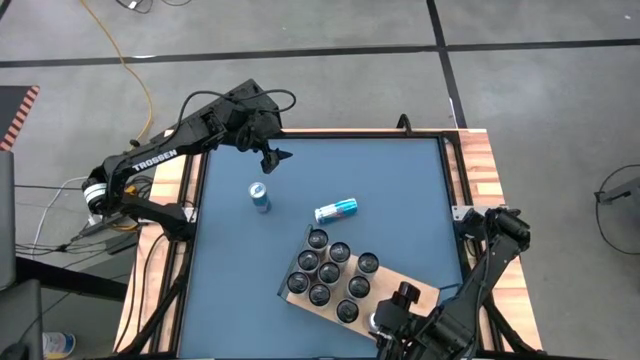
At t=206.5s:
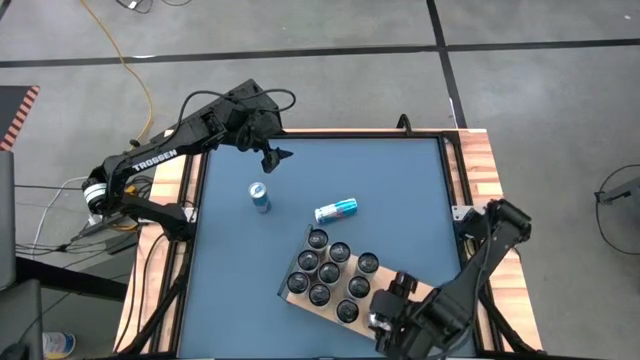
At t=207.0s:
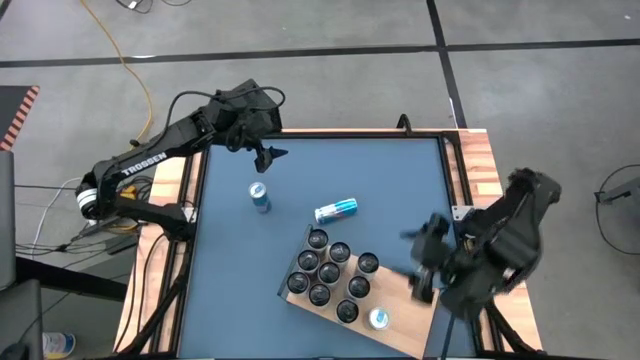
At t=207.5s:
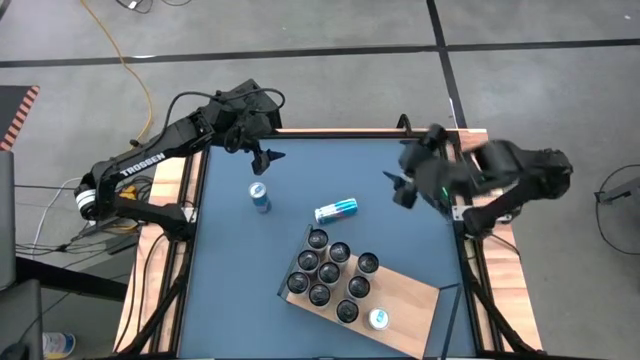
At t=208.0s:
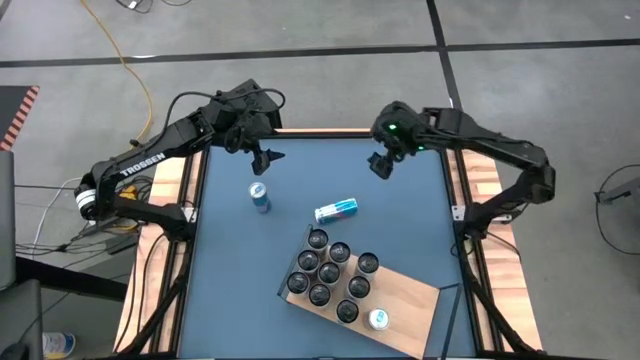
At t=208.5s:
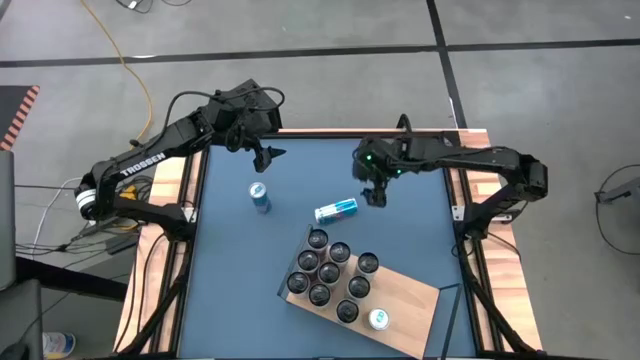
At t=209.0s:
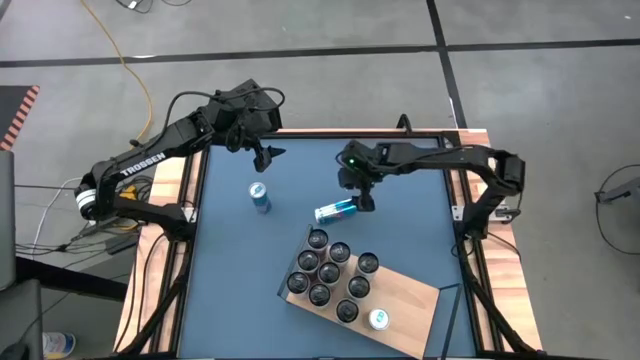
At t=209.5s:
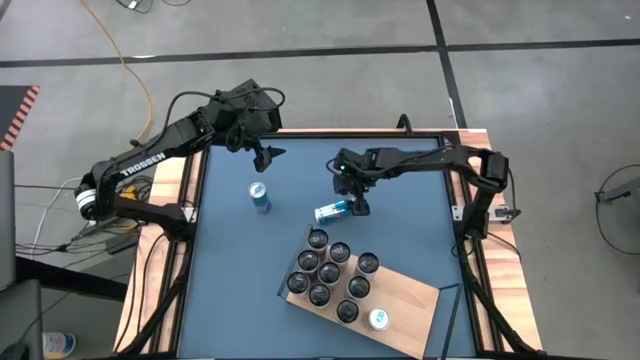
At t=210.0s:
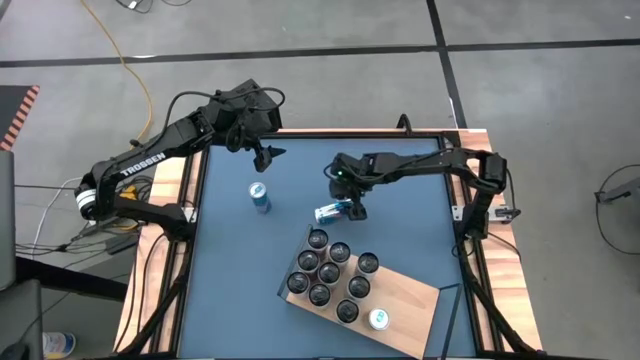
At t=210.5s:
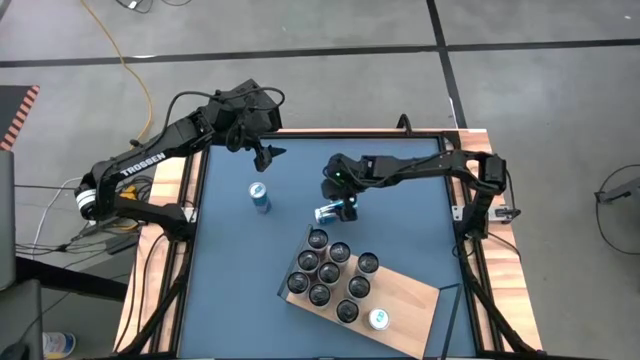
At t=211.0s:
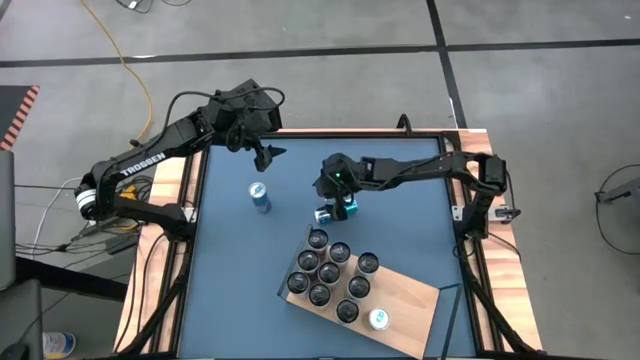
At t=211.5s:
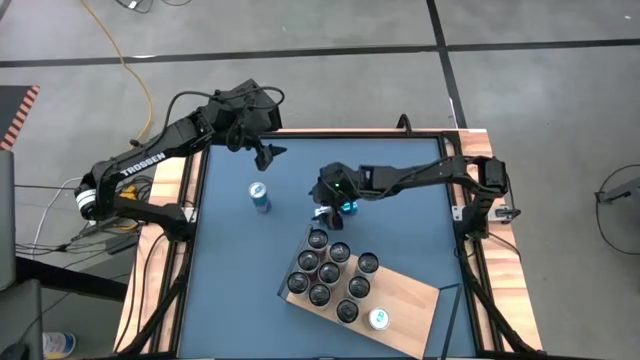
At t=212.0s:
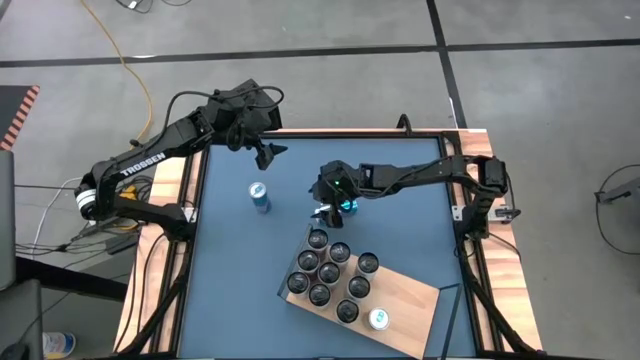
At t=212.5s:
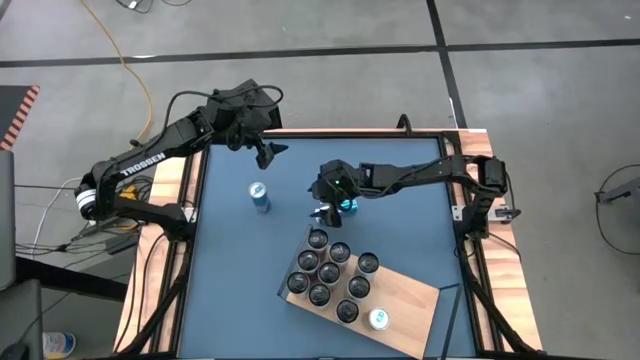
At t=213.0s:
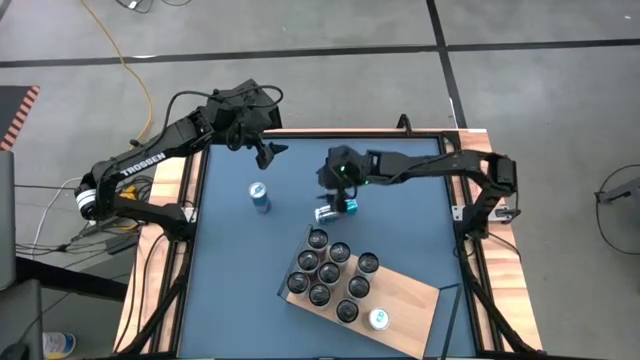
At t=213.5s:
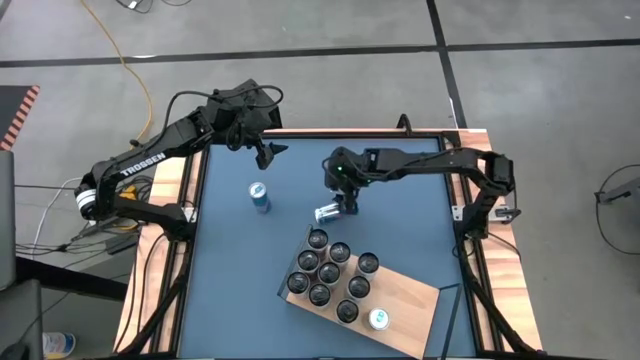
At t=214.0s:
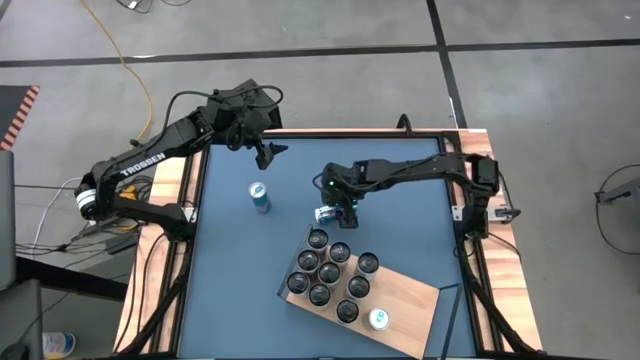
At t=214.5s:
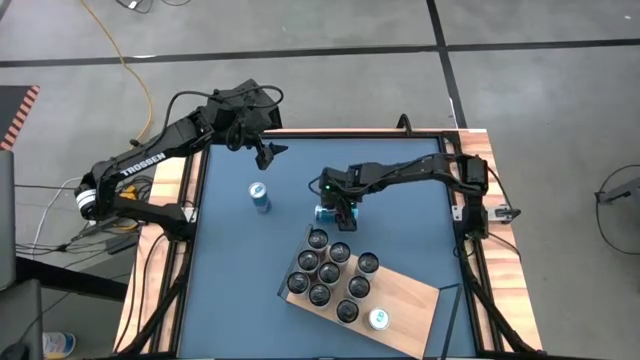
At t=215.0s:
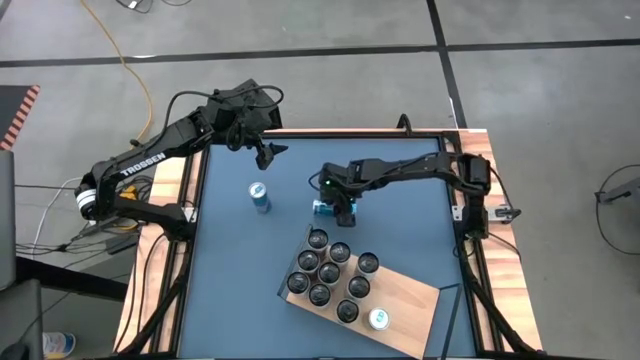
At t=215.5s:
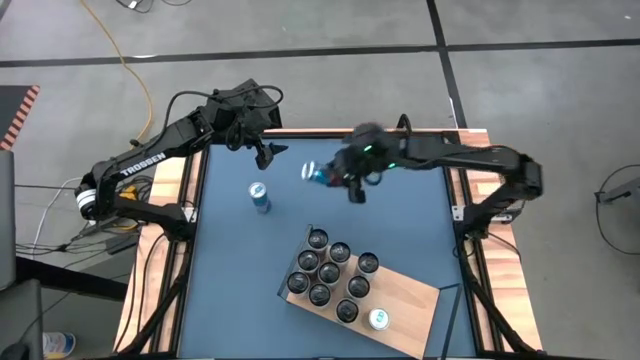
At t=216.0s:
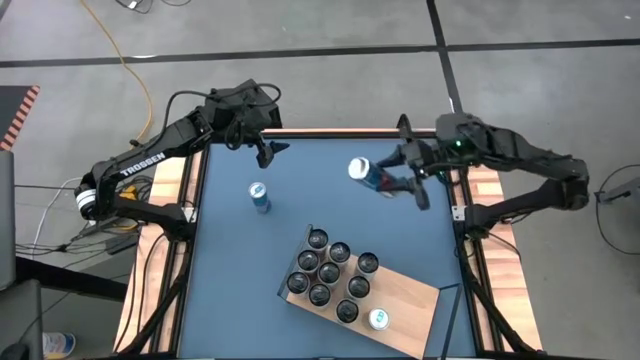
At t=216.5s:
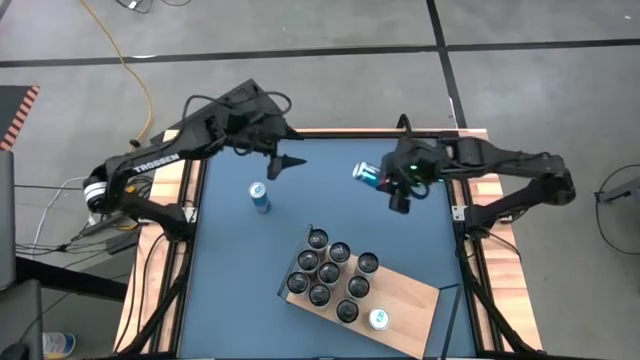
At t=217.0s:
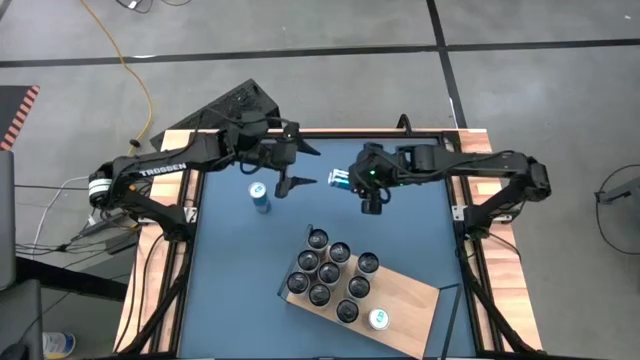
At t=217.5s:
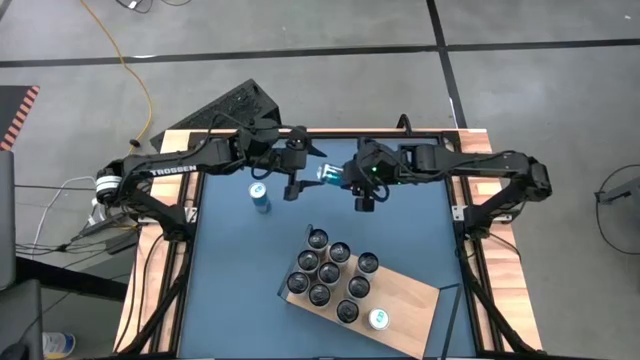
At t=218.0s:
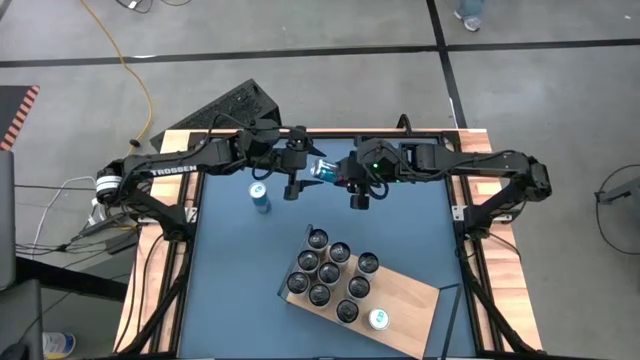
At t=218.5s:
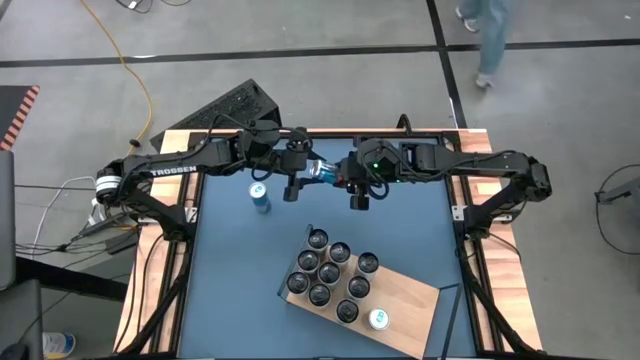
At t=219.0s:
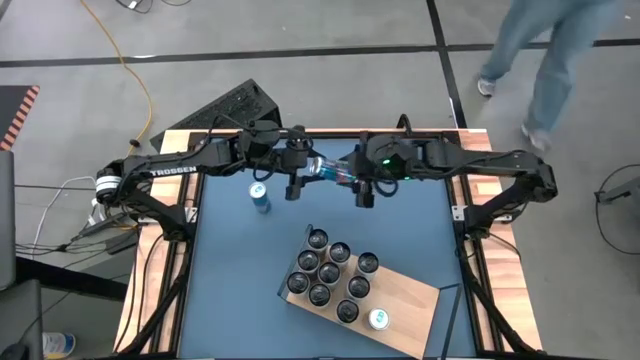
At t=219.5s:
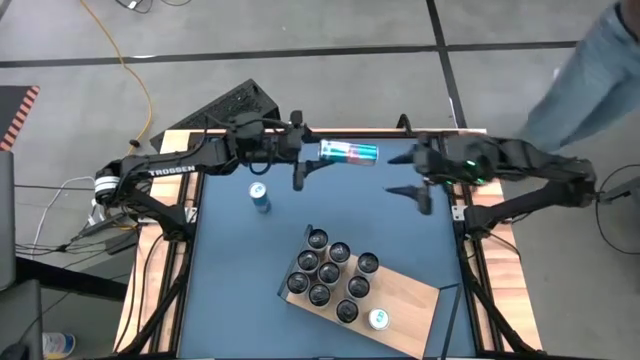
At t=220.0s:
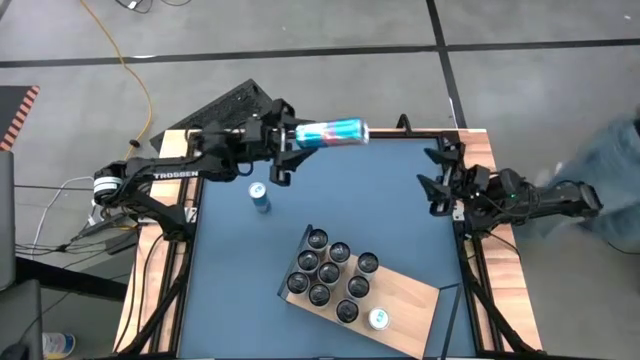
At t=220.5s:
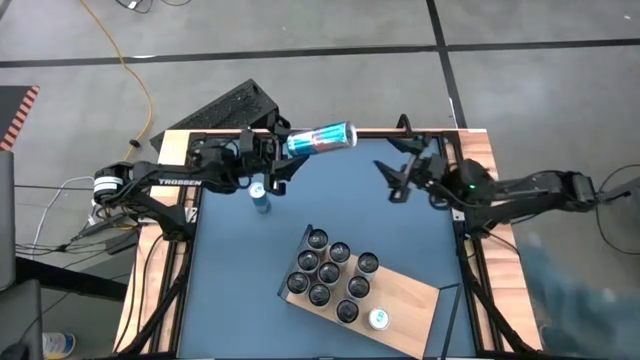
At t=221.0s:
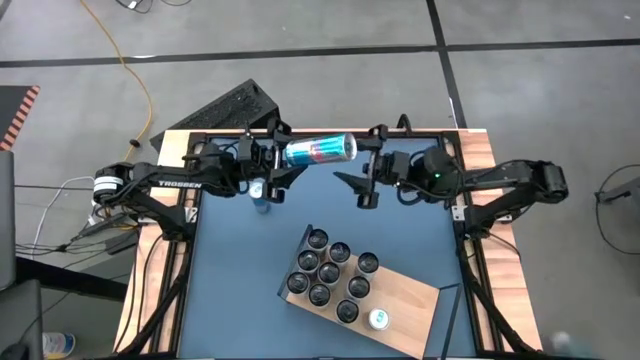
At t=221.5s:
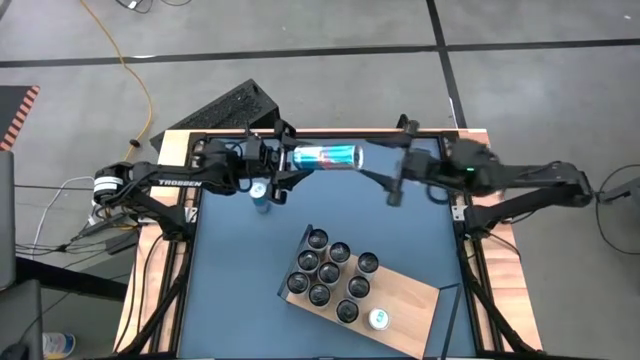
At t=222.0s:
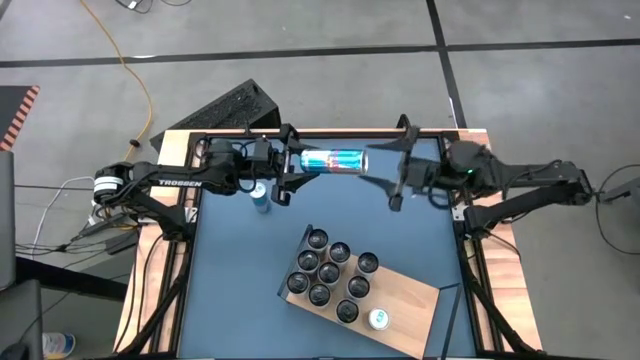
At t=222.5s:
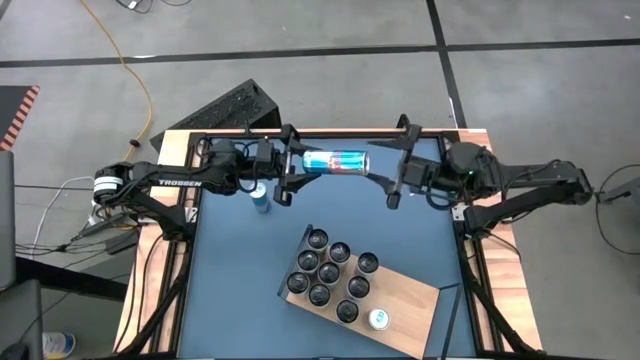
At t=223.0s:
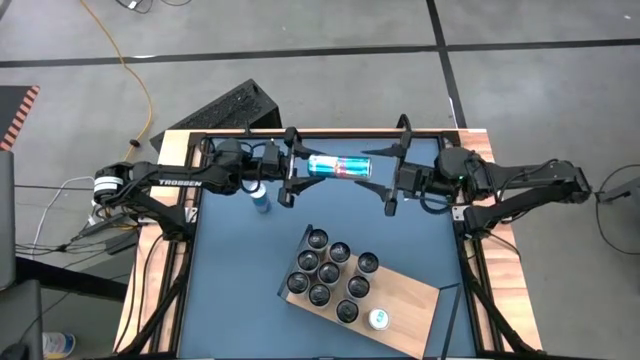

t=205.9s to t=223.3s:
Task: Place canned beverage on shelf
Put the right blue soda can aligned with the other blue soda can on the shelf

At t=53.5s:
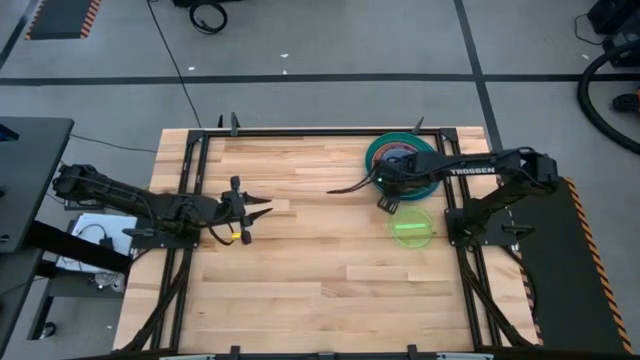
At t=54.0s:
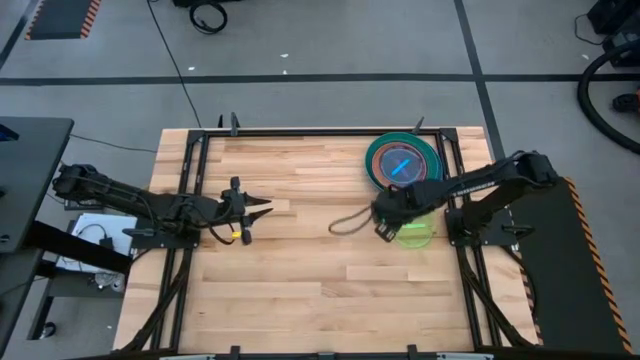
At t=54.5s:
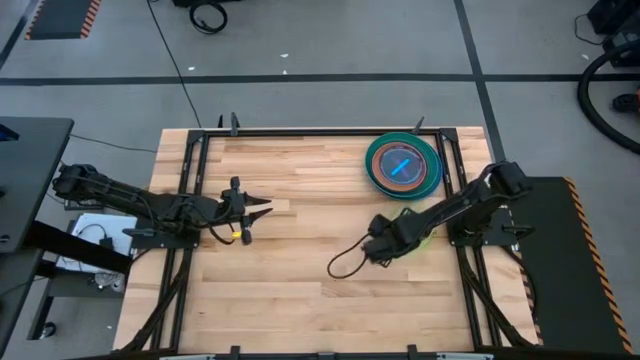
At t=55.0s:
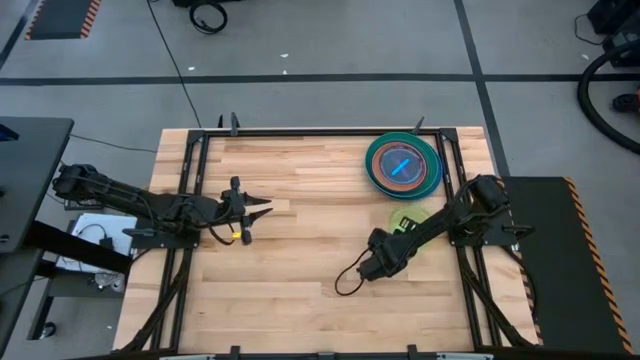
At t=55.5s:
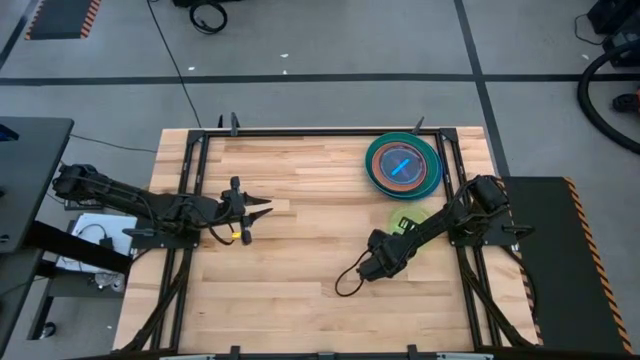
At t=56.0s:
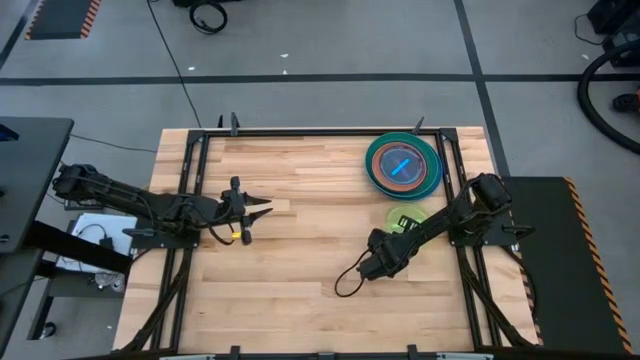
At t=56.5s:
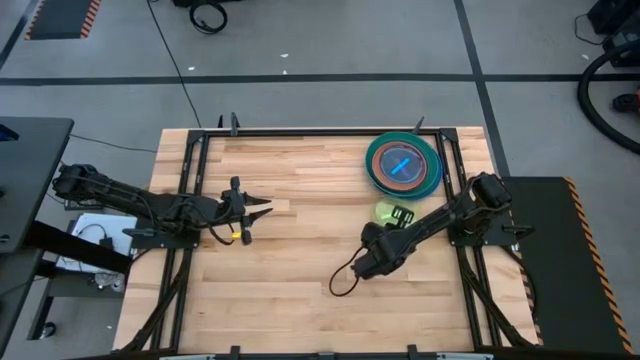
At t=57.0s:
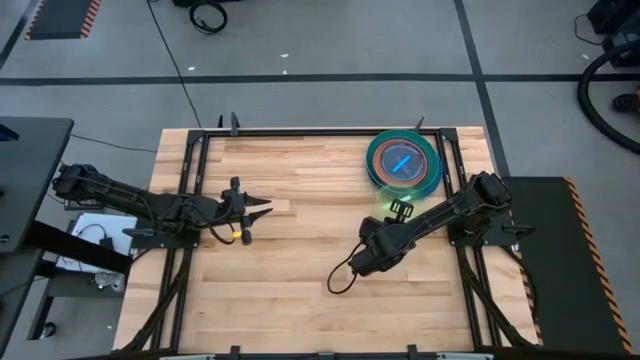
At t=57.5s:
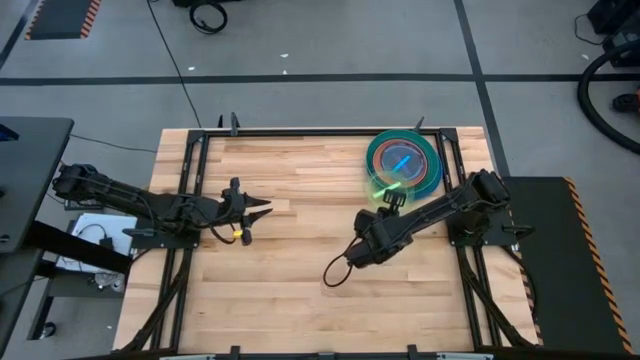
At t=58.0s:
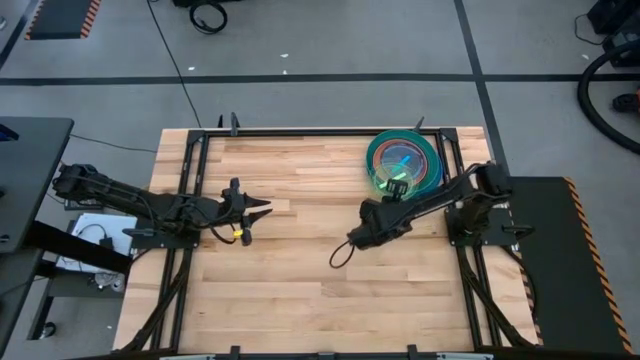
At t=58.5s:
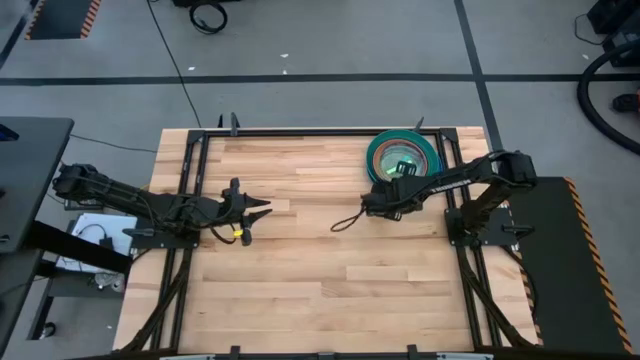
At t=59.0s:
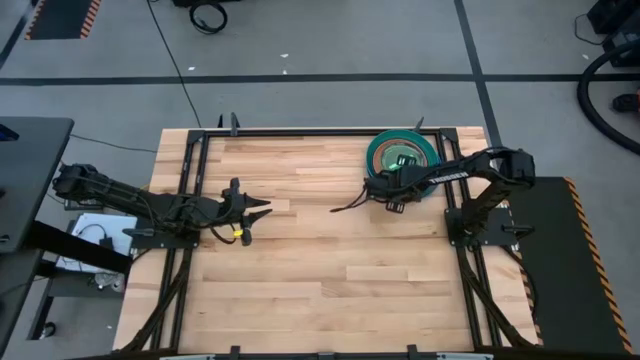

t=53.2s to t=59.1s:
Task: Stack plastic plates
Stack the light green plate on top of the blue plate
